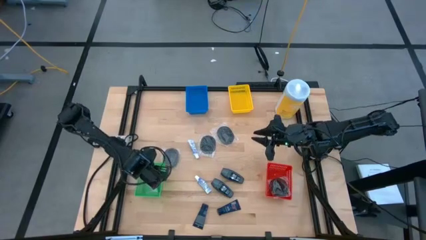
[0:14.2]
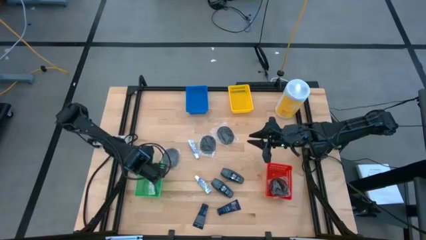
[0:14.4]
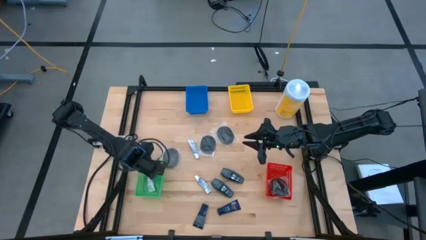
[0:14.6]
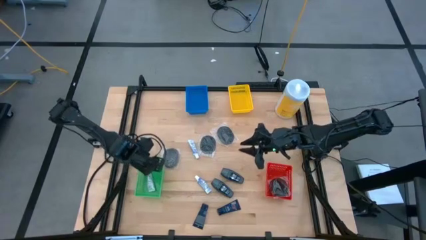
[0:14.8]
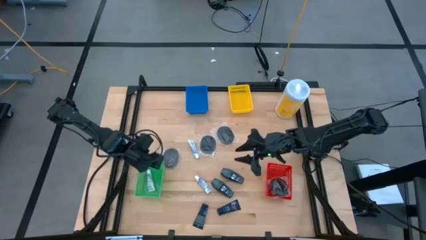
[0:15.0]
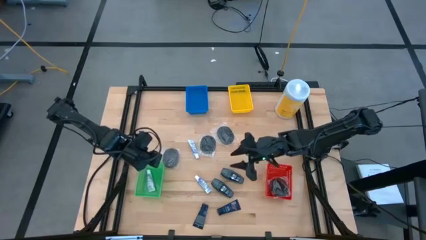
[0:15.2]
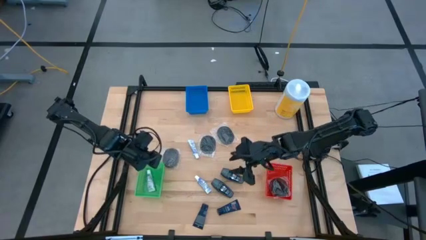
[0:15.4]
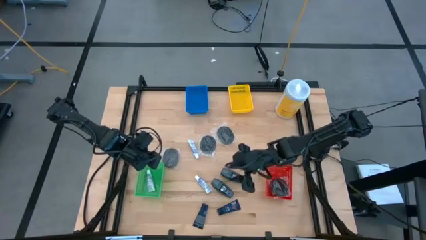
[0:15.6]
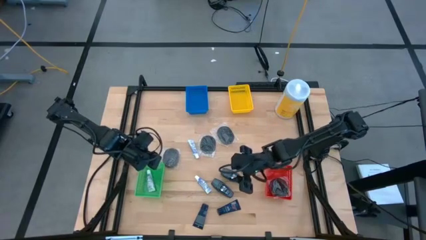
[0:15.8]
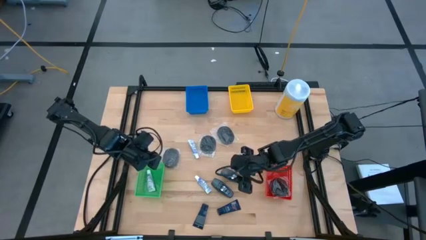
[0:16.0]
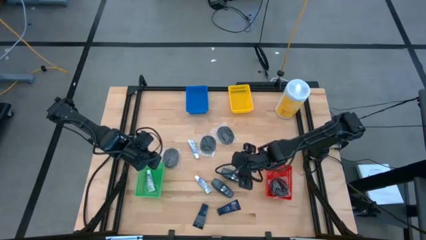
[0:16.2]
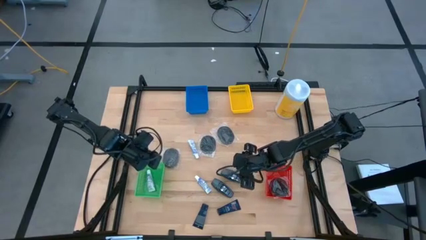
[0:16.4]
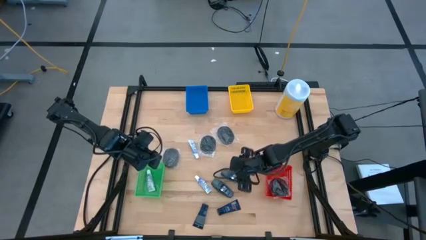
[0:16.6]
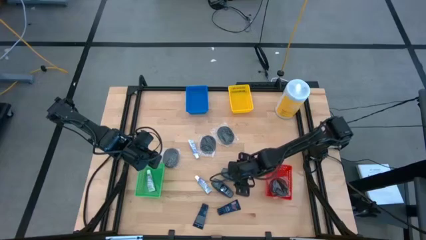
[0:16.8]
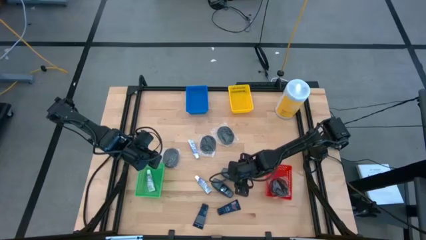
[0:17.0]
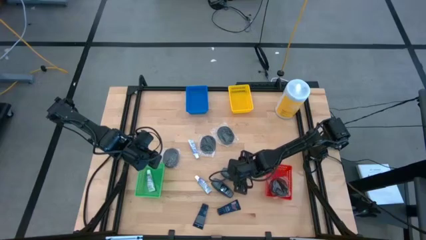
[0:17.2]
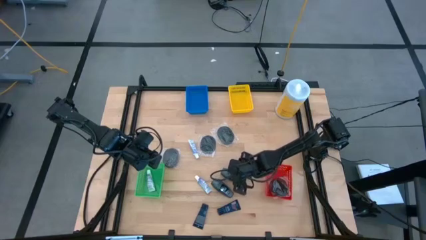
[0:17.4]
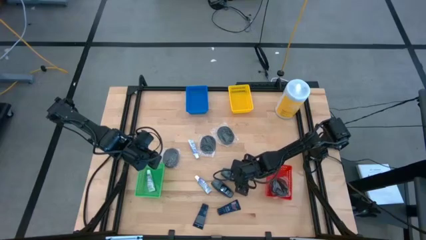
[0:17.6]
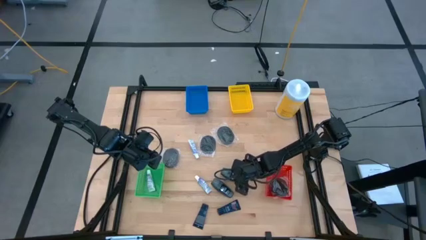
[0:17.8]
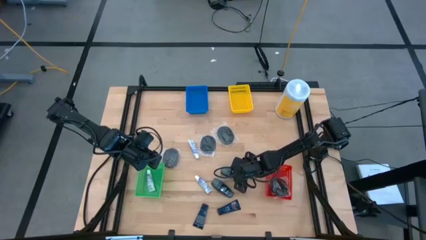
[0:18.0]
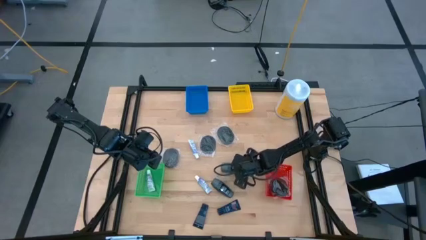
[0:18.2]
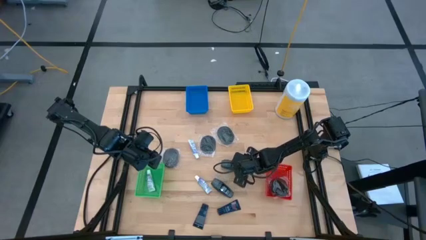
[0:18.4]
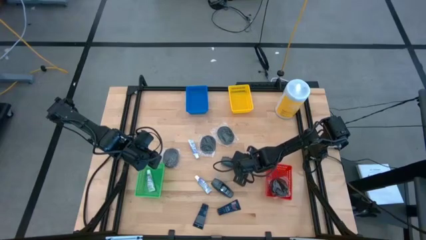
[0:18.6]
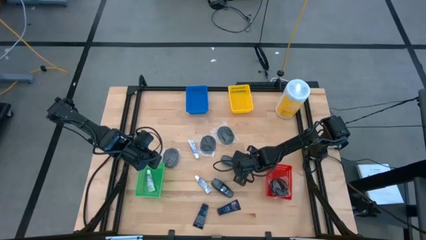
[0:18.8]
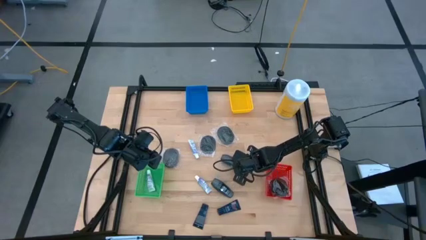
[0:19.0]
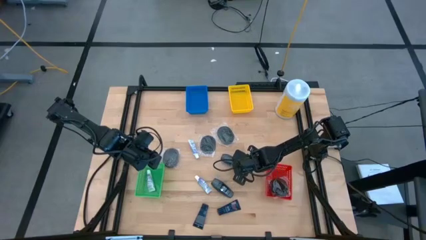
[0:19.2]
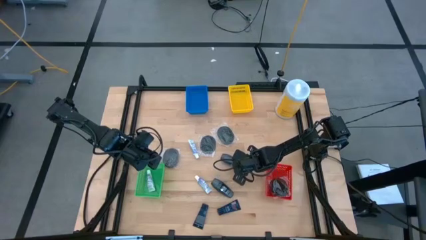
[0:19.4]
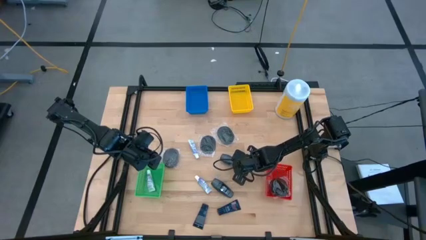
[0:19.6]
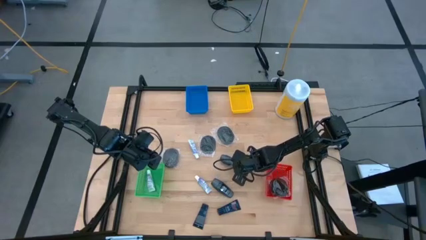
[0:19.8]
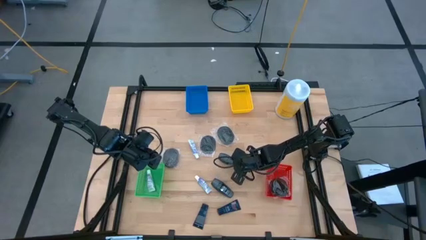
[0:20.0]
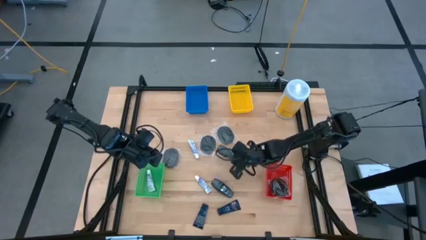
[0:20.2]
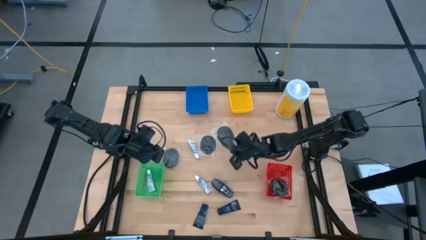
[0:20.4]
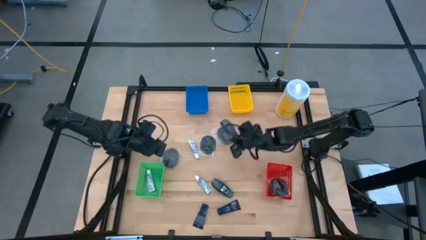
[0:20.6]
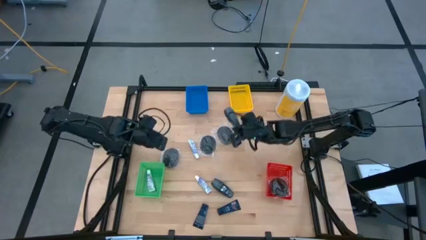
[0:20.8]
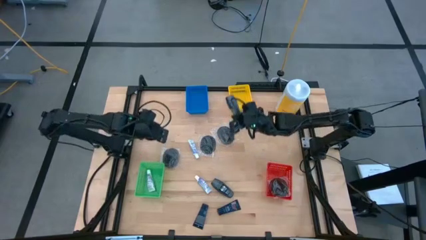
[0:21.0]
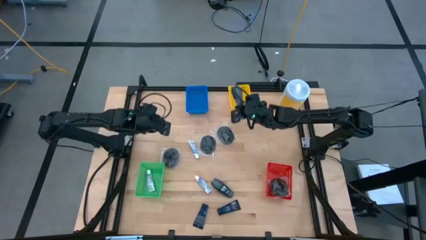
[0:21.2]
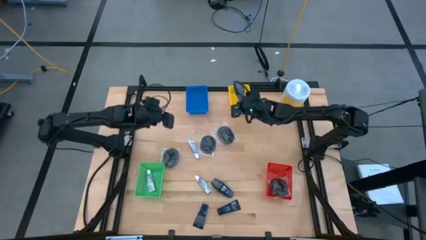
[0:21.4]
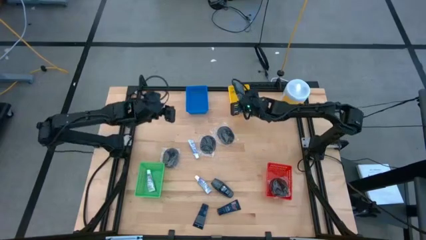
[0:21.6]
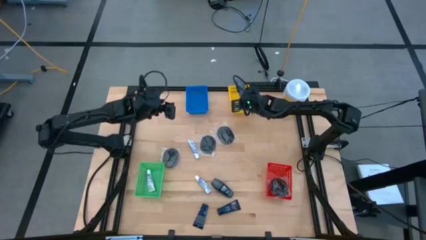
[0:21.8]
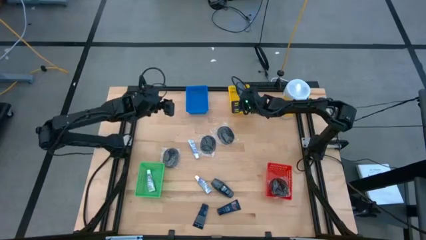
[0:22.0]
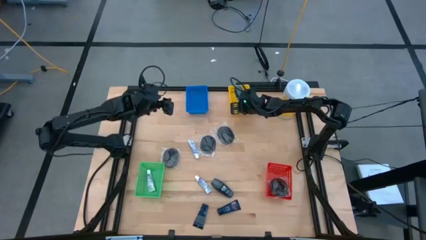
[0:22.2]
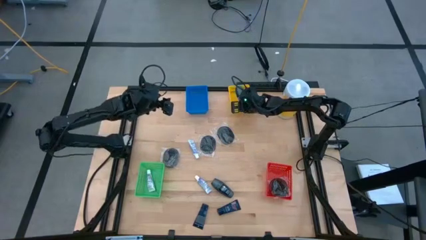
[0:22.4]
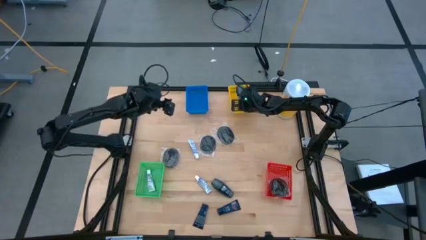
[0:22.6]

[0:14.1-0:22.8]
Task: Pick & Place Travel size toiletries
Put the black deodorant into the yellow bin

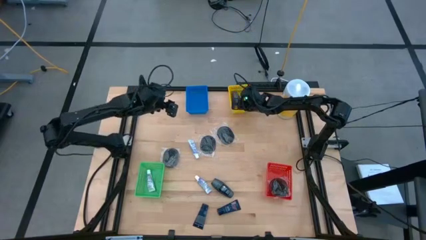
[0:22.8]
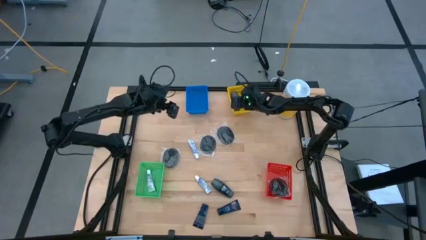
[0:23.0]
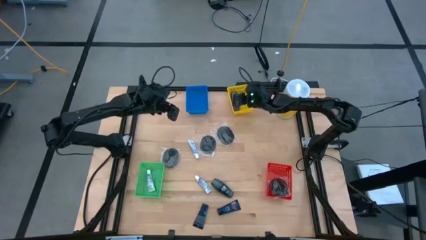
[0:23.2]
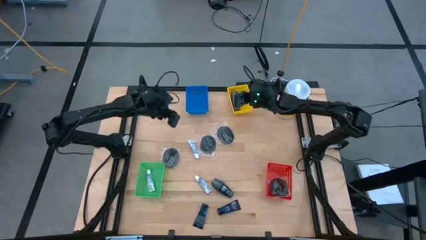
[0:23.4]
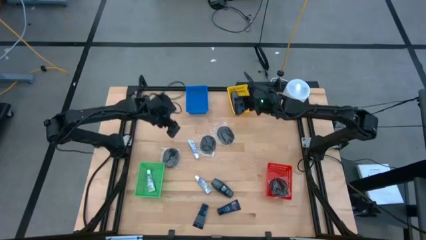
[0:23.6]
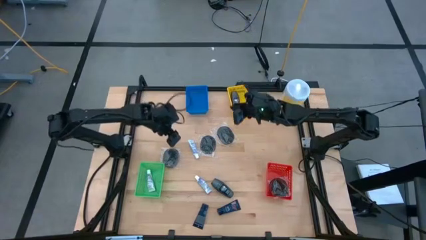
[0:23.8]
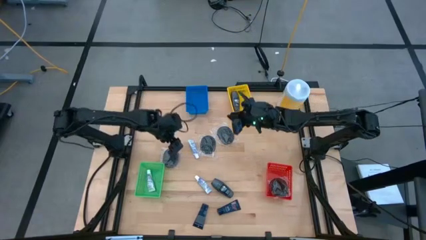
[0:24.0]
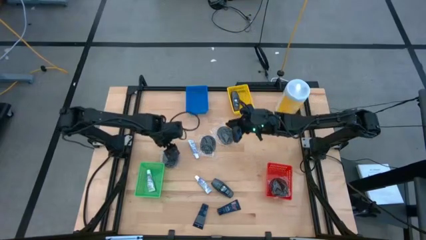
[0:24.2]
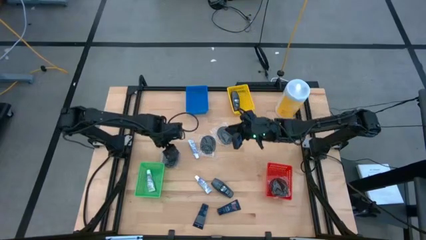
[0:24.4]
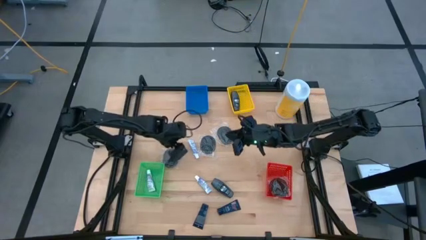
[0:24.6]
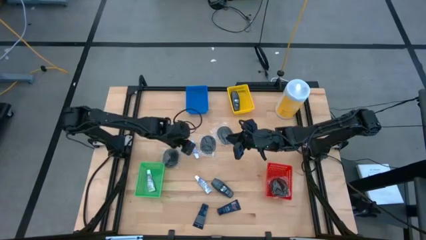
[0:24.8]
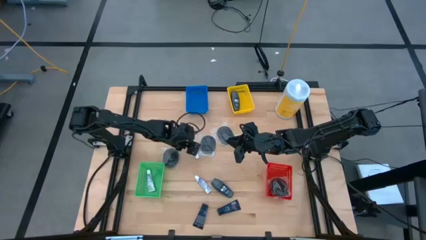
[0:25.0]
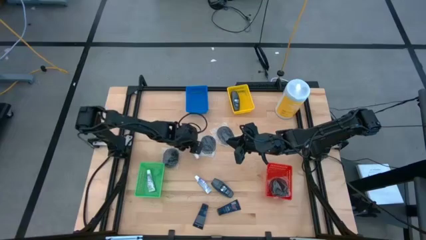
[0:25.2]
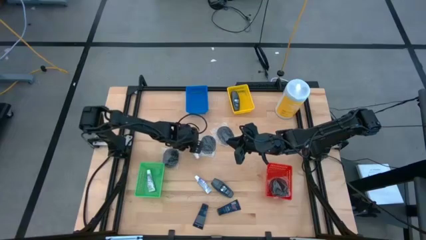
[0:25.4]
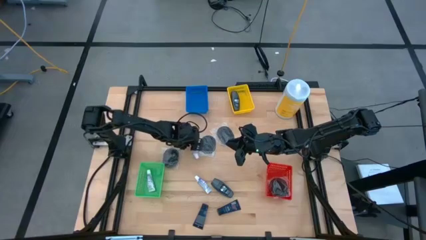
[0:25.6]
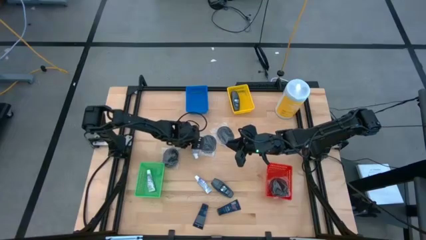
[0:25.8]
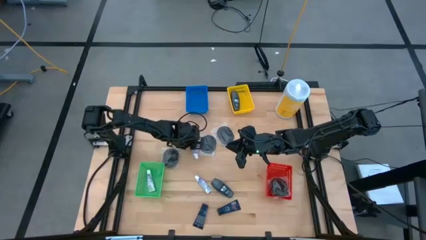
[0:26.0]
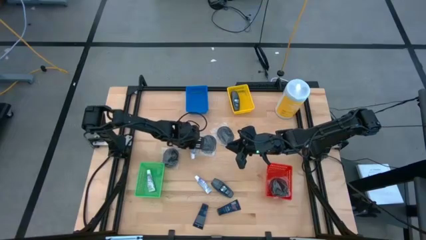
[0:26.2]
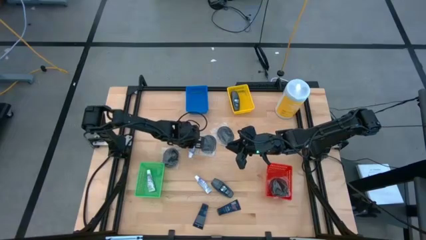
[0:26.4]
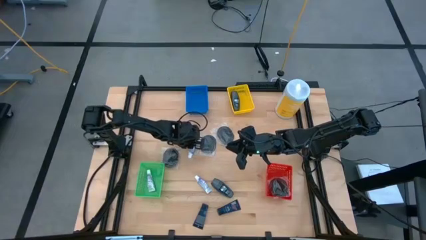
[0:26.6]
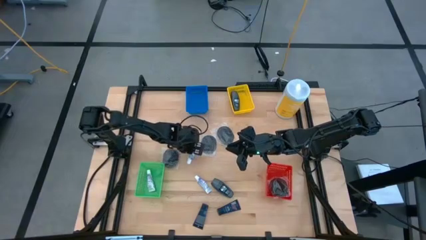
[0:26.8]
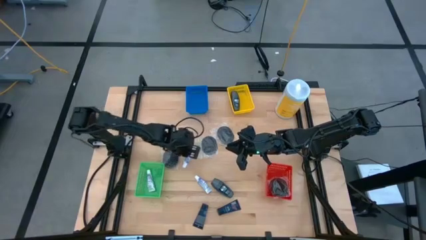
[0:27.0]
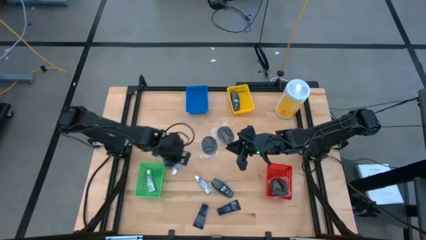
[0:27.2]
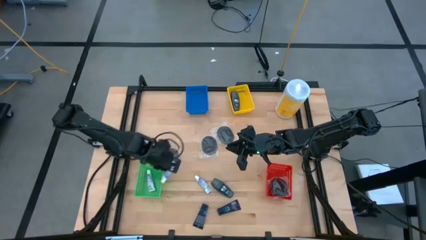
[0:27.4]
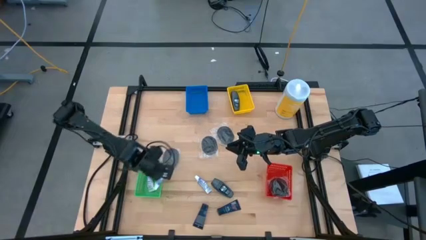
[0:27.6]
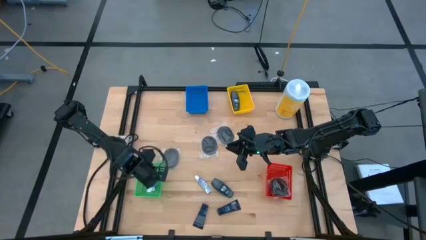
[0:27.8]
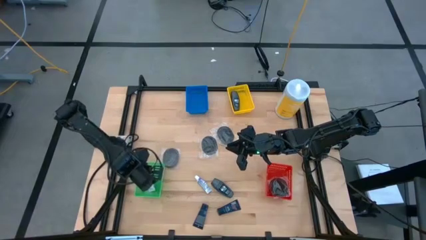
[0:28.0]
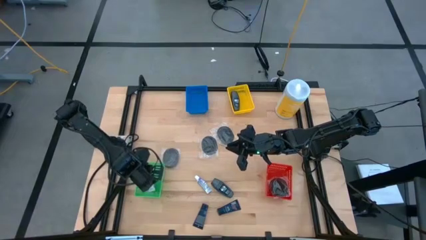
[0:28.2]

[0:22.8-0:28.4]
Put the white toothpaste into the green bin

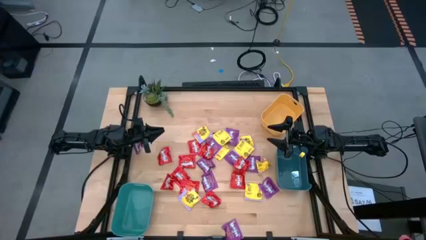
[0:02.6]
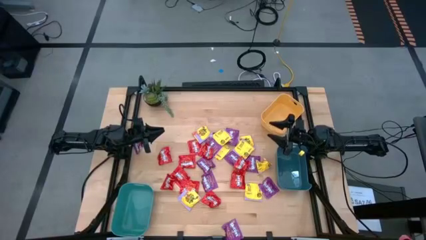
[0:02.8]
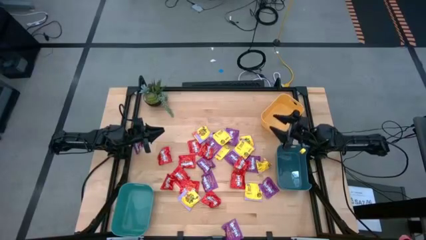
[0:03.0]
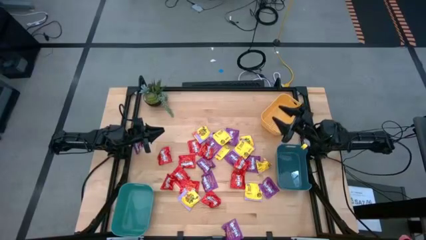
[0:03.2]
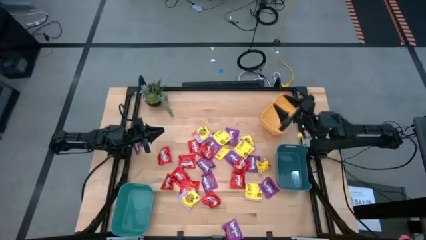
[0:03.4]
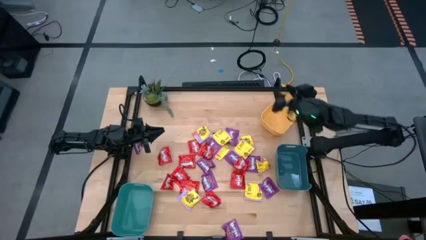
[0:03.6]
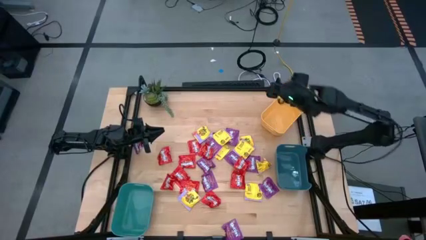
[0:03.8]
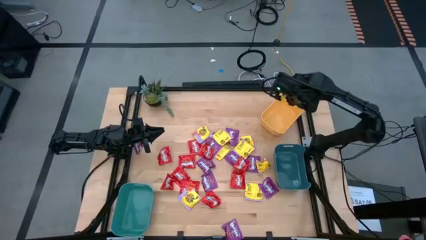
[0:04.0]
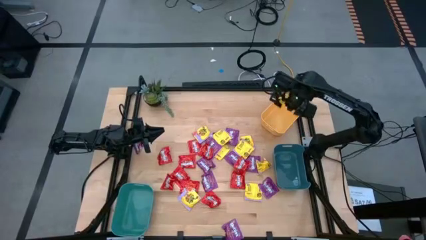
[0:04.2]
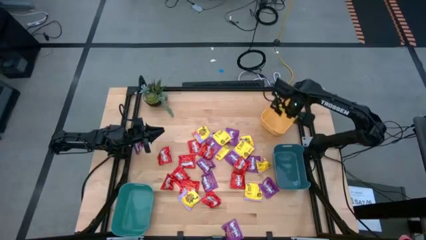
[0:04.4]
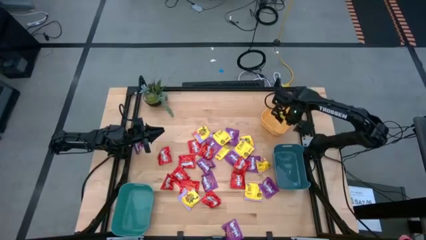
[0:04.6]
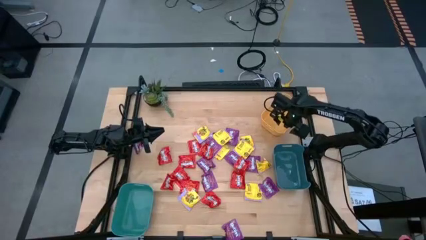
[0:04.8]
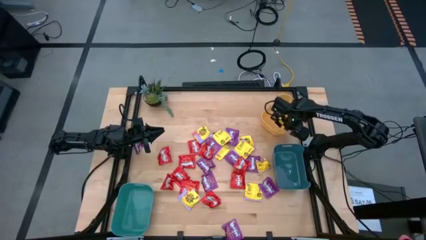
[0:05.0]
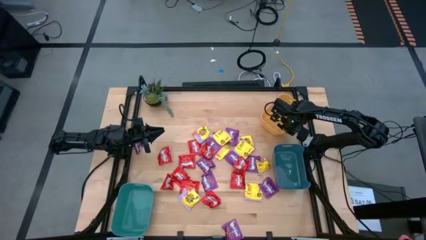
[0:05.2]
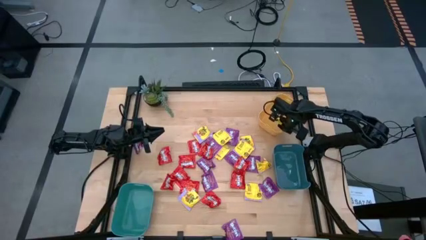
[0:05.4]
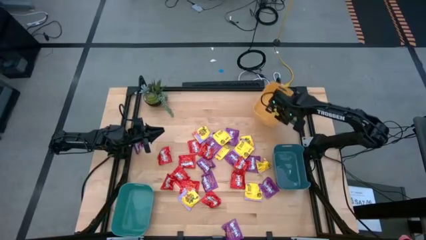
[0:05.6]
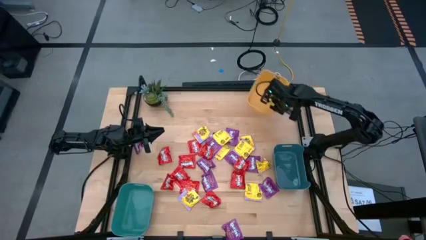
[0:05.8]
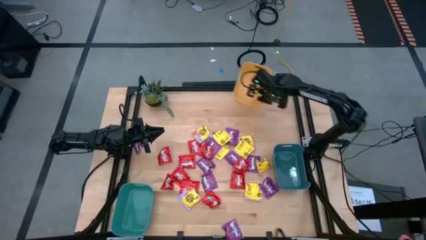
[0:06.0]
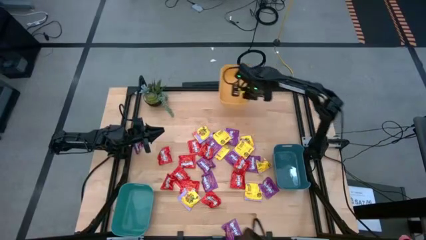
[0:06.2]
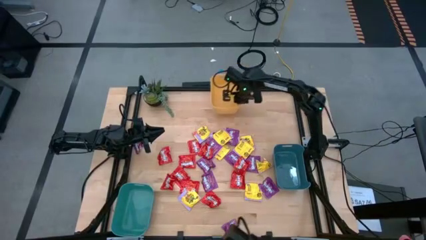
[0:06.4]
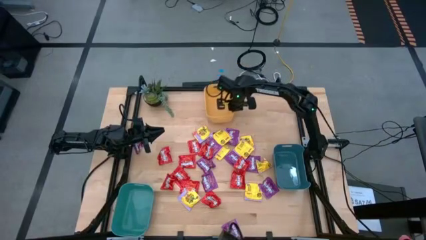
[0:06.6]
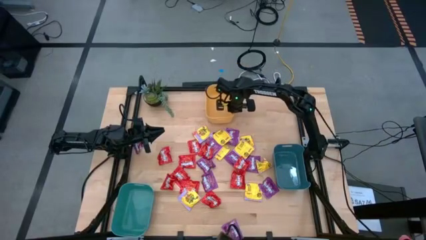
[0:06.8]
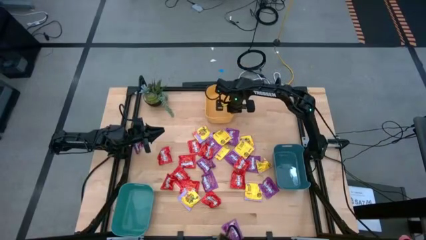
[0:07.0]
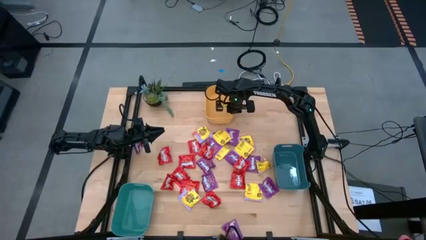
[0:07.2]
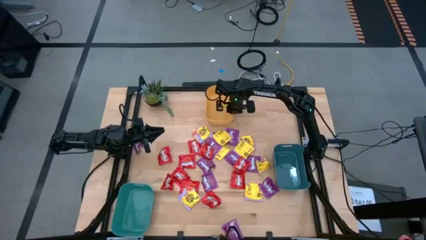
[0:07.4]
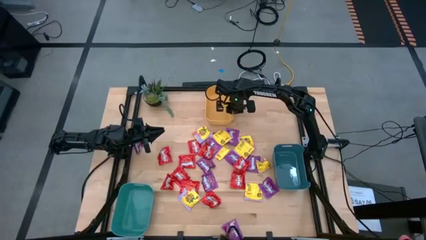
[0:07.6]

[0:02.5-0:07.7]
Task: Sort candy
Move the yellow bin to the top center of the table
